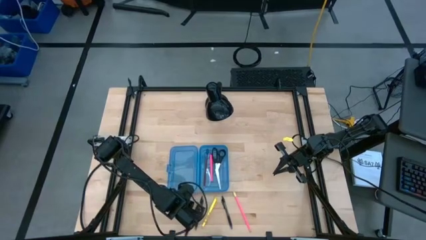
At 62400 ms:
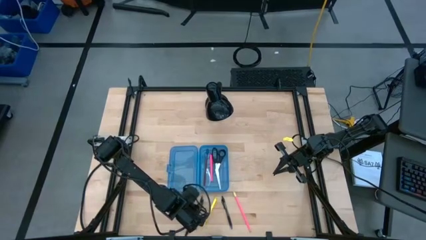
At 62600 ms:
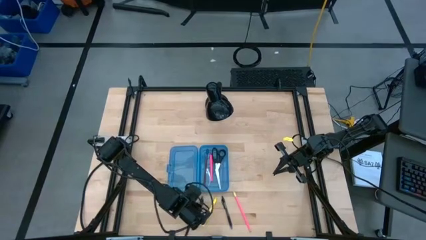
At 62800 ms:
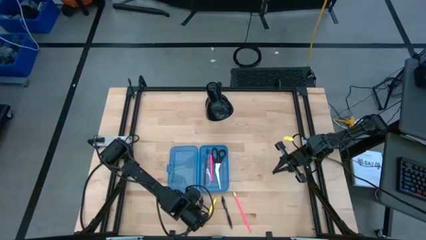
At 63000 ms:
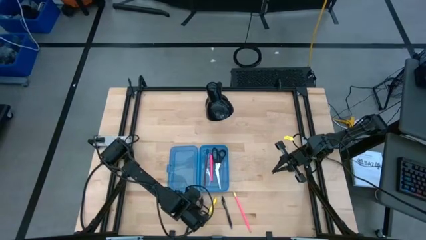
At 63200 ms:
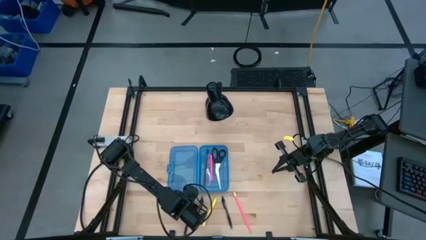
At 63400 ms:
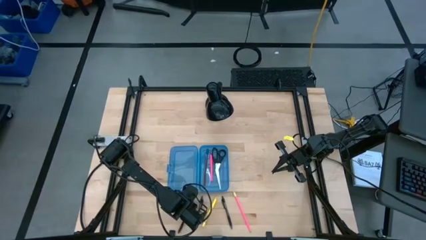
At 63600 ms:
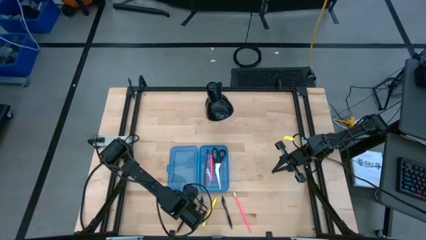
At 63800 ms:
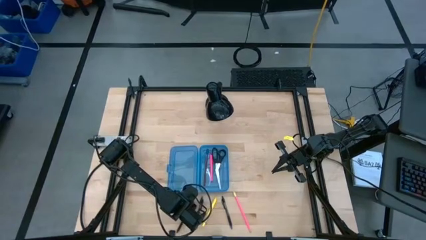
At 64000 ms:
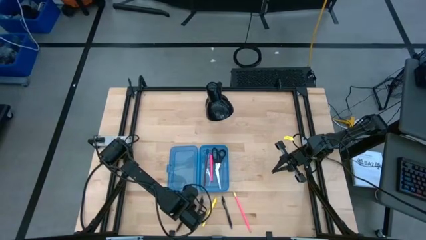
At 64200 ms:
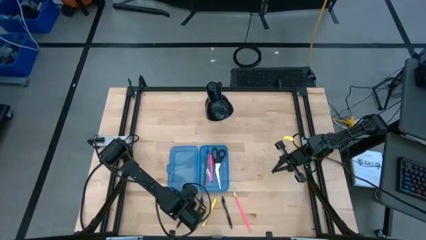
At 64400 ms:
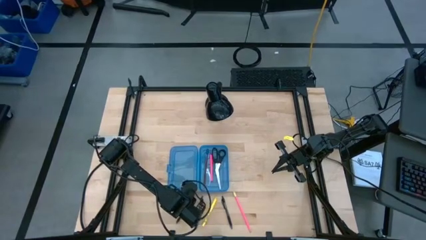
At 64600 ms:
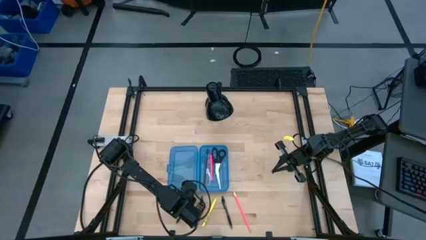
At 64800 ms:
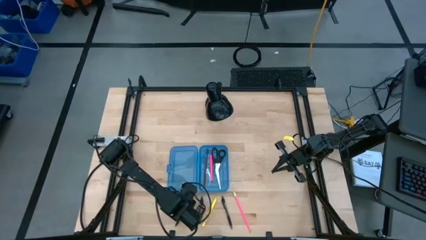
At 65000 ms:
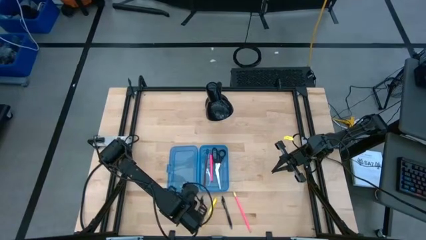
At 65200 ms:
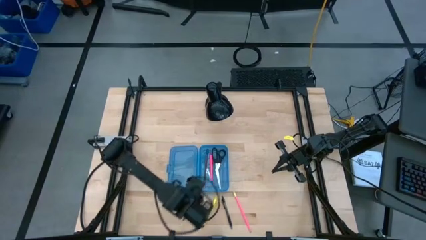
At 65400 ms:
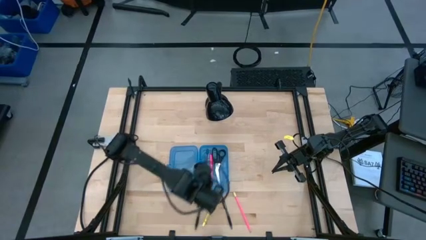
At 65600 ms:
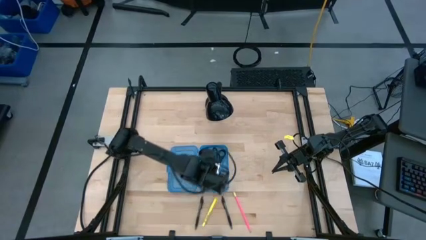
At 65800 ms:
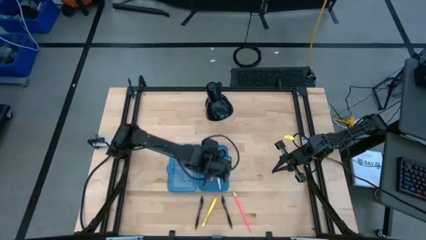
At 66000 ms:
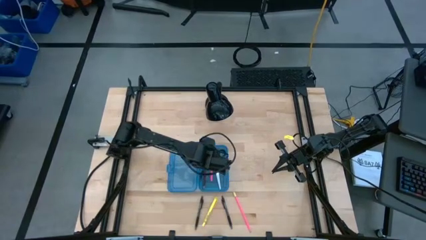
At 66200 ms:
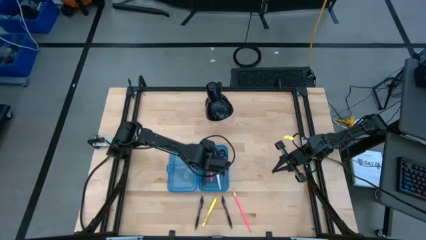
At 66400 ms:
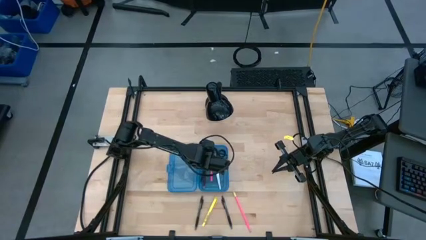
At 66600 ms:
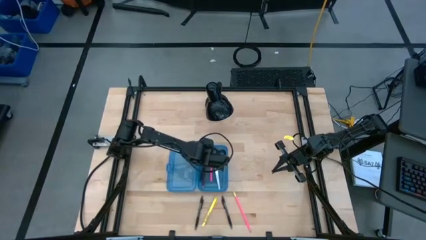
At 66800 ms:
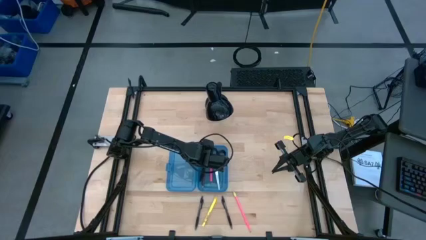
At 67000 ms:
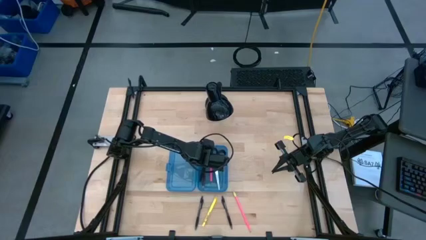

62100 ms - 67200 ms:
Task: Pick & place school supplies into a supply box
Put the left black pen into the blue supply box

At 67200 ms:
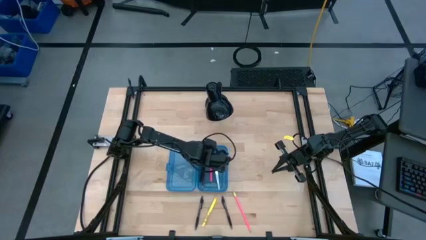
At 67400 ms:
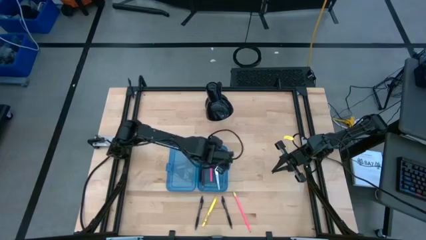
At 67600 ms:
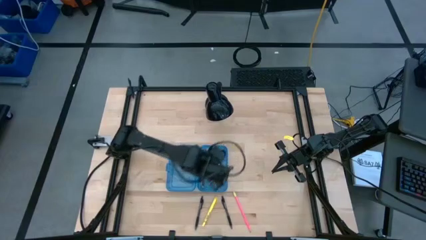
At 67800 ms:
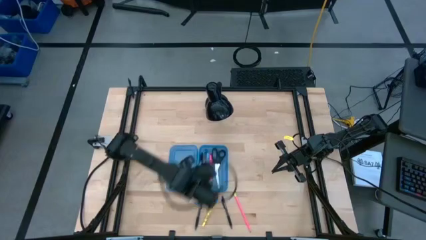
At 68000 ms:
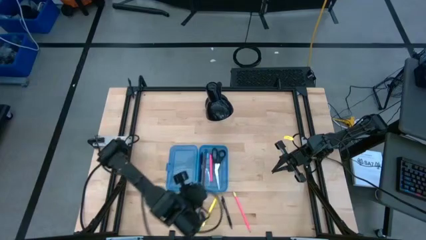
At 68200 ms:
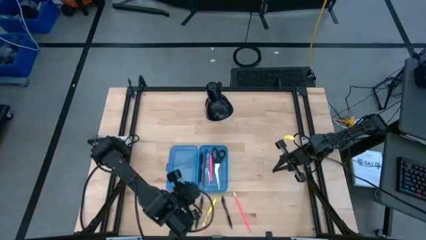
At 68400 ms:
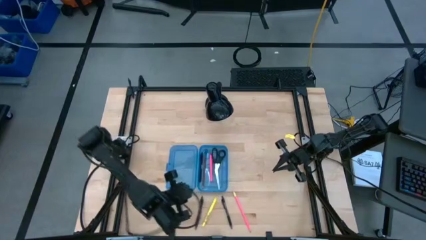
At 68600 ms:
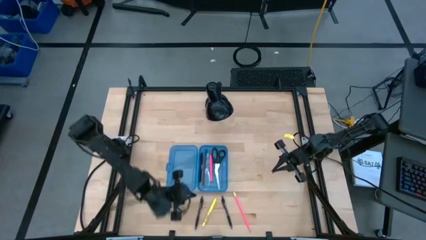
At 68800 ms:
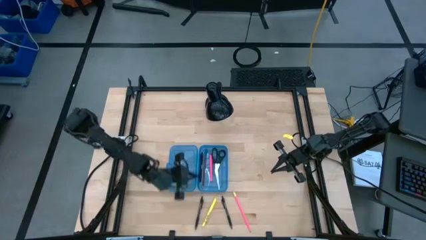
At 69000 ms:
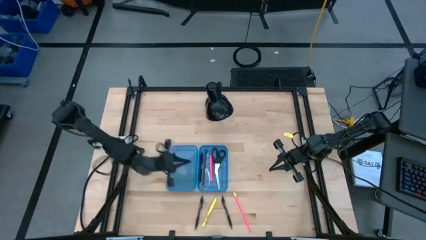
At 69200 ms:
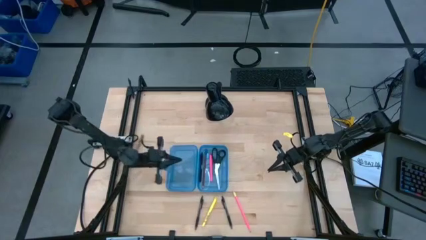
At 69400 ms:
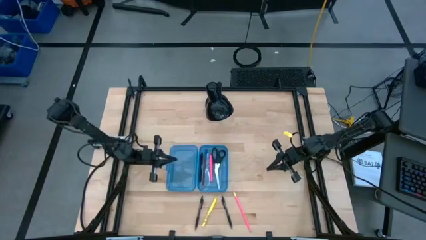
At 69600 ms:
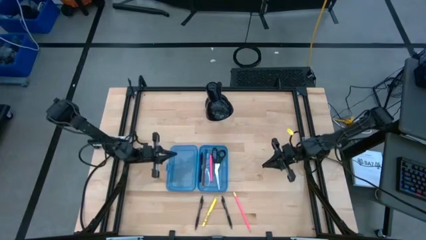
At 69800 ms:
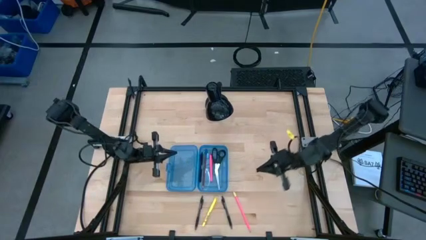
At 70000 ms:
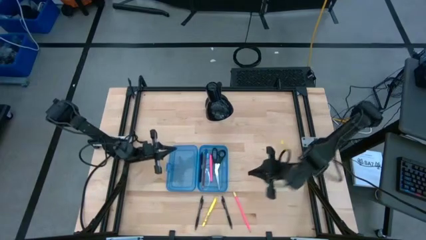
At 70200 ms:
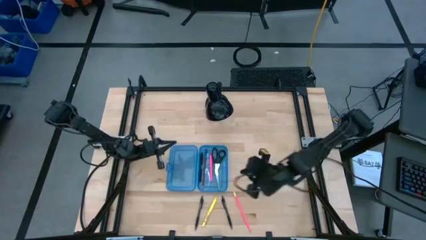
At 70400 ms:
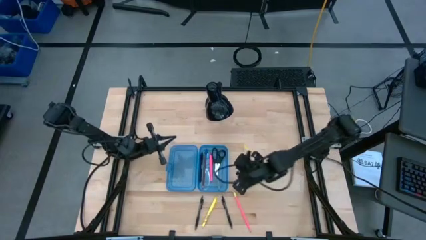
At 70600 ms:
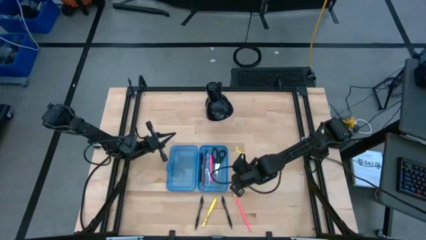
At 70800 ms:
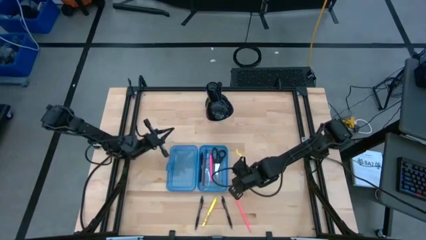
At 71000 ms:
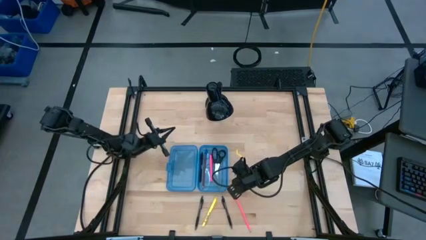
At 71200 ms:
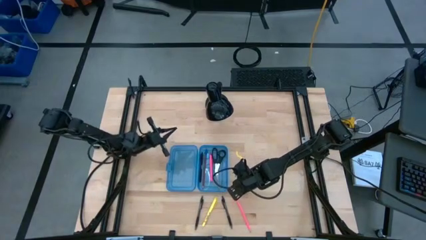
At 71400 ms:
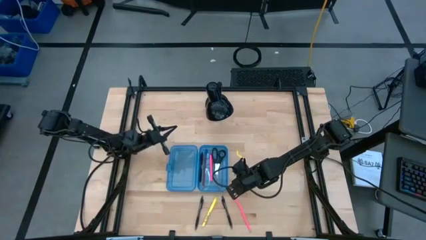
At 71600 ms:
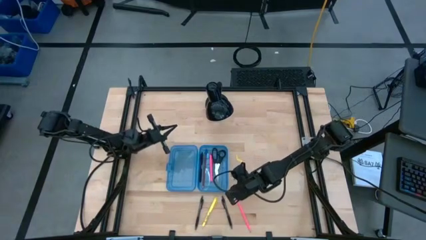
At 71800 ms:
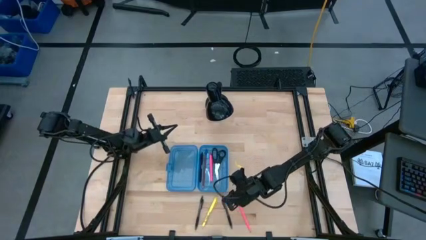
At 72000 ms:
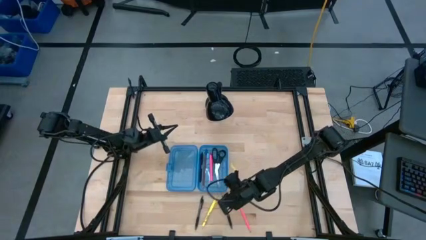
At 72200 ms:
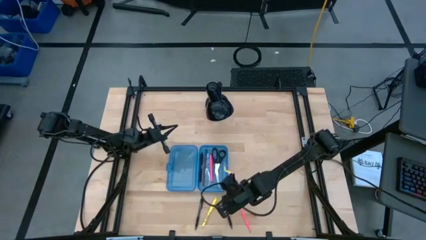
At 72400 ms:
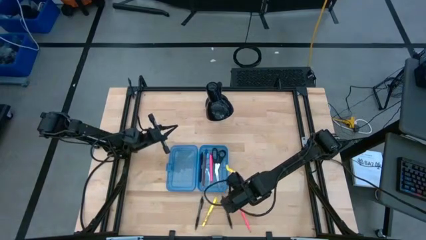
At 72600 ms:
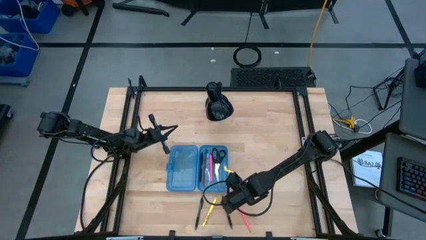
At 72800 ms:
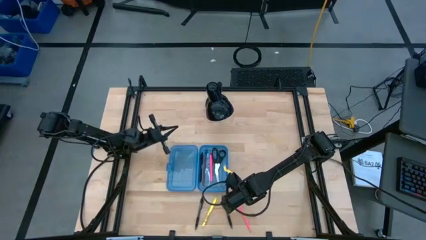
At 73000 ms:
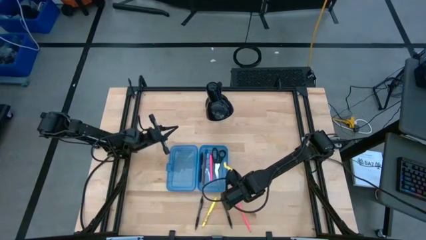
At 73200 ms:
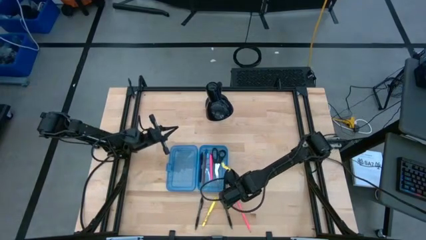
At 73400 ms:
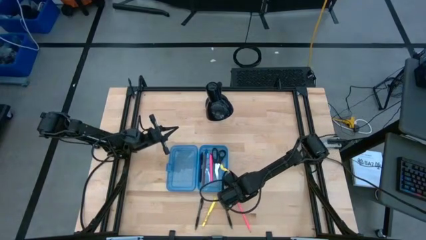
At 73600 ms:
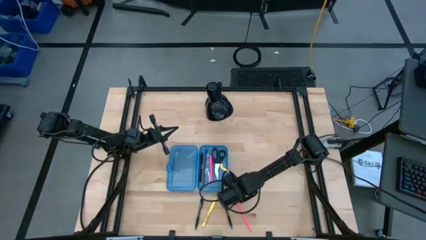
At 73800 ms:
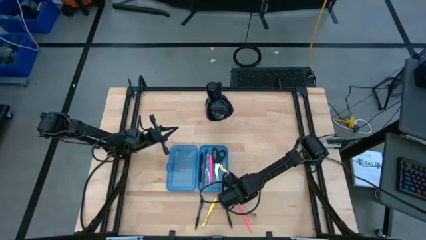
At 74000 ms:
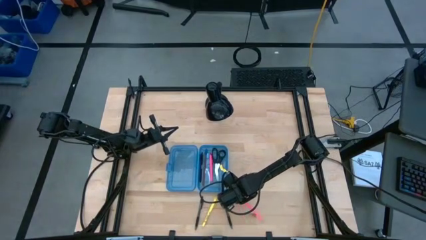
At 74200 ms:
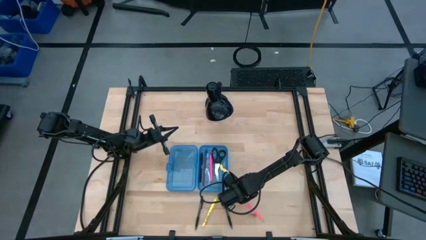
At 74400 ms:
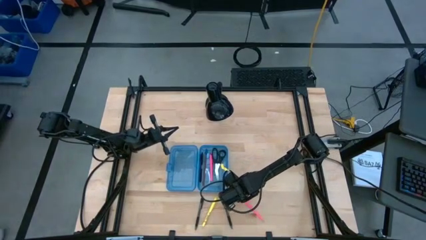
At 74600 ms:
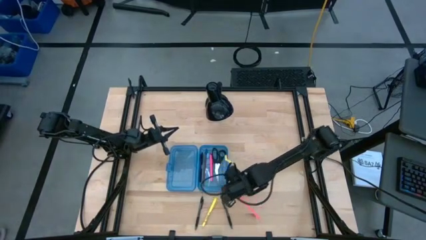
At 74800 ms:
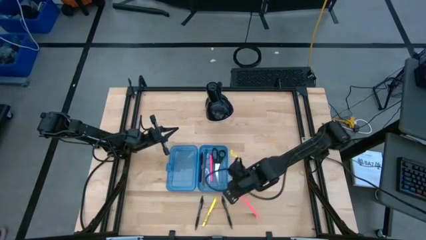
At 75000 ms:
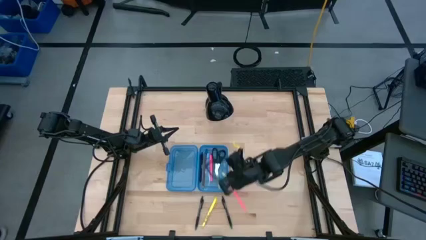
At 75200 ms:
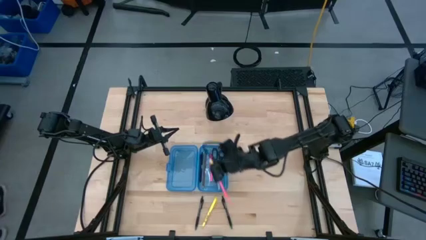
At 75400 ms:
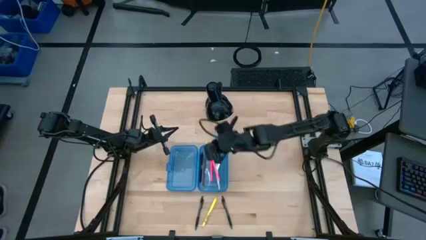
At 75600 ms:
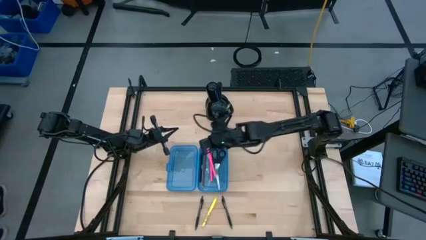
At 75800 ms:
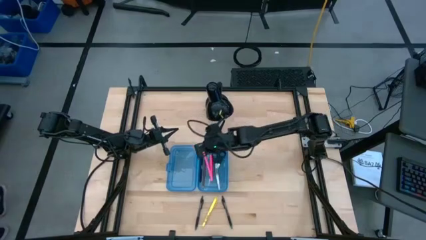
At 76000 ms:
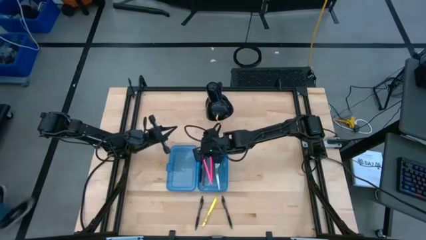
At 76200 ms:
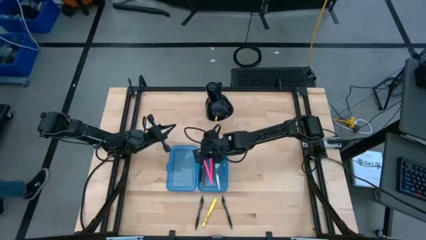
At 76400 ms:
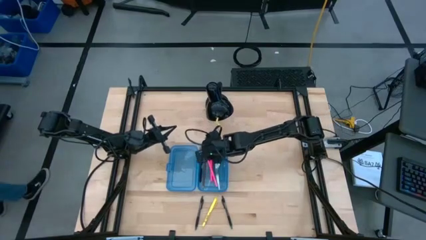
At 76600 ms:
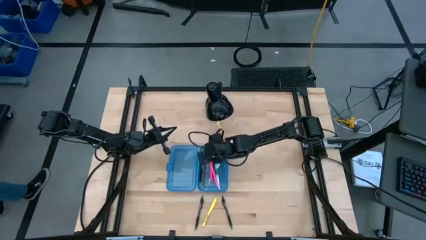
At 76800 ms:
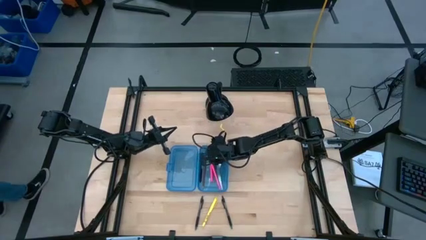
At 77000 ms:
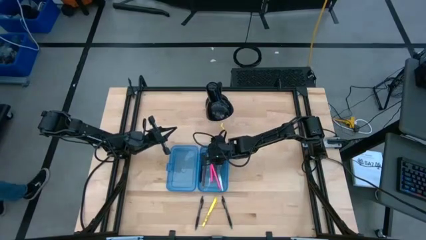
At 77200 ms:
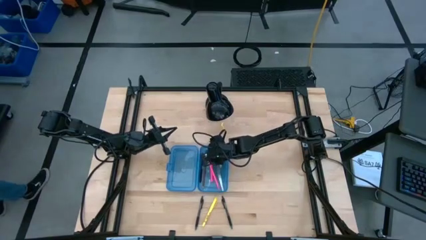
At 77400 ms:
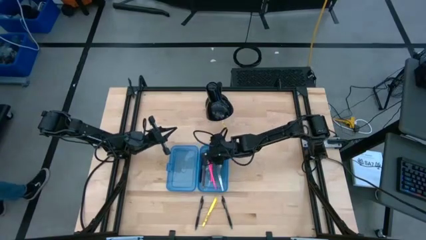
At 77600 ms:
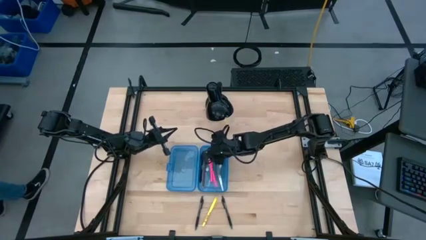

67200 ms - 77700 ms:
Put the pink pencil into the blue supply box

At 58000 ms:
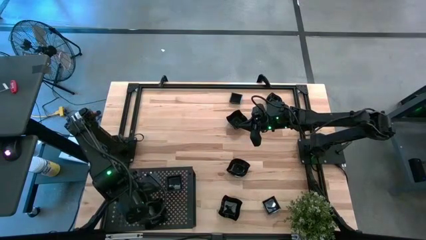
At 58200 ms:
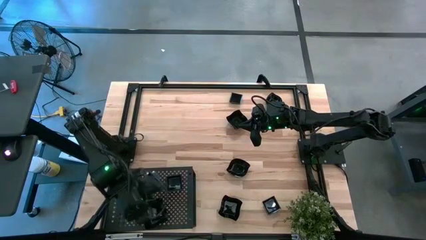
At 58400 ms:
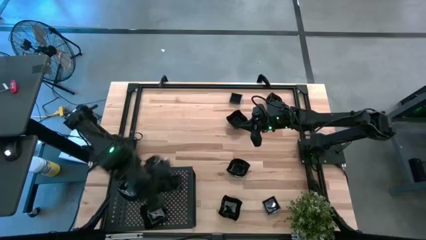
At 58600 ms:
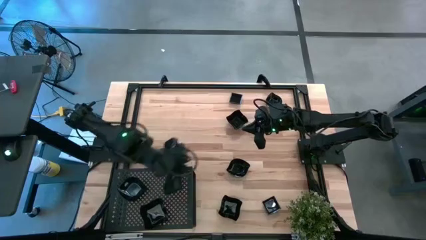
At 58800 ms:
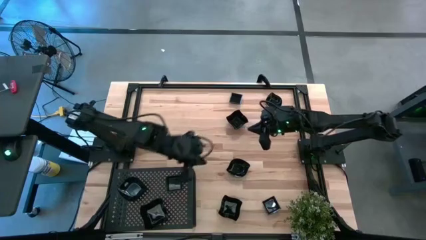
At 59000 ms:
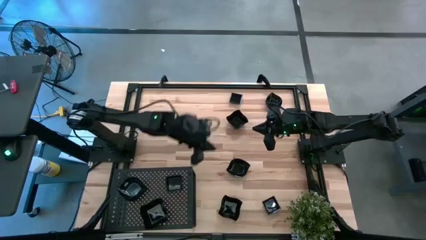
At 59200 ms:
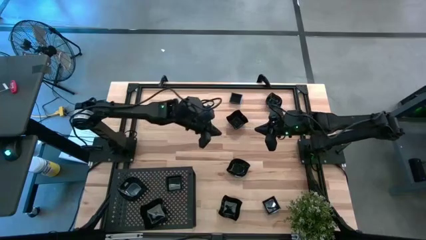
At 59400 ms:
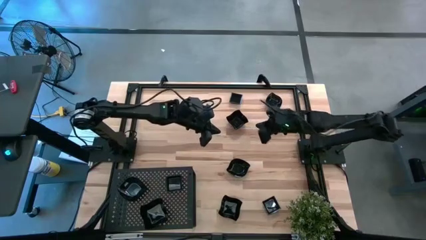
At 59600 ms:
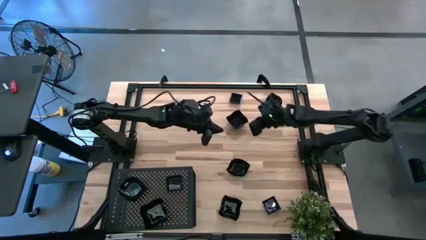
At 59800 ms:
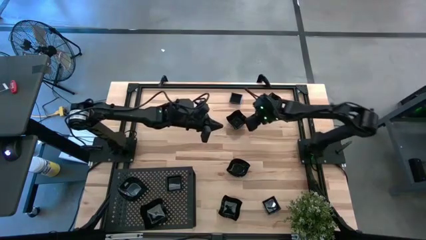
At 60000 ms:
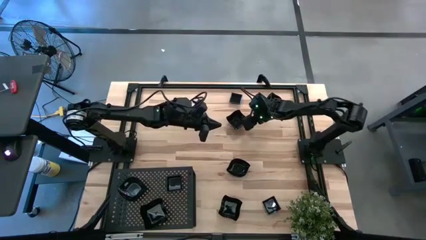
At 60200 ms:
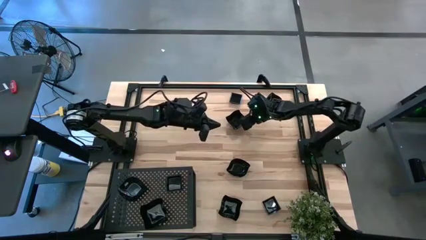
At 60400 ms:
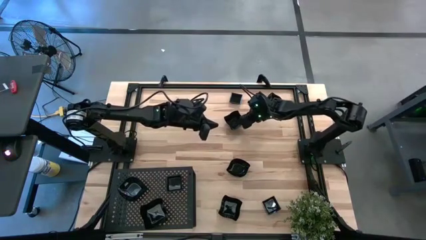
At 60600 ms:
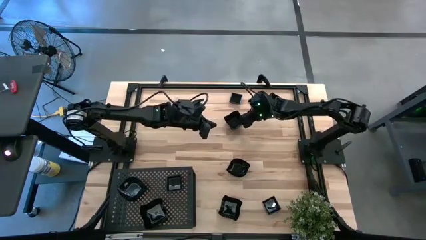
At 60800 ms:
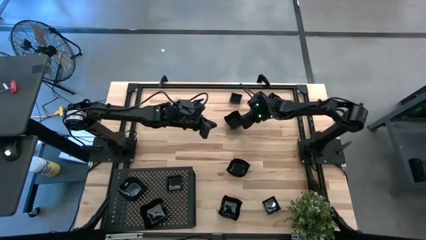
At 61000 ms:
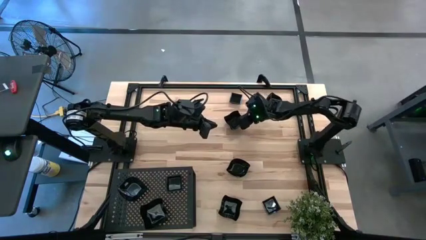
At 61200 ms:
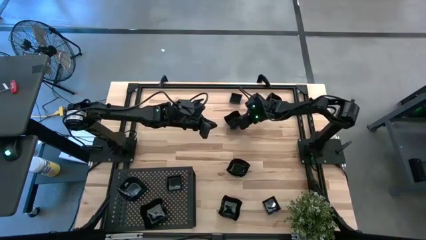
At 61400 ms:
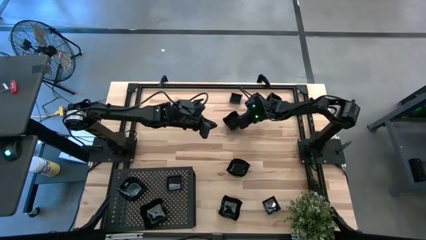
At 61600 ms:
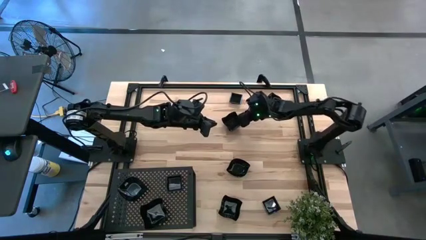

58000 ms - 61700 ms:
Task: Pick & Place Mini shaped plates
Stack the distorted square plate on top of the distorted square plate on the shelf
